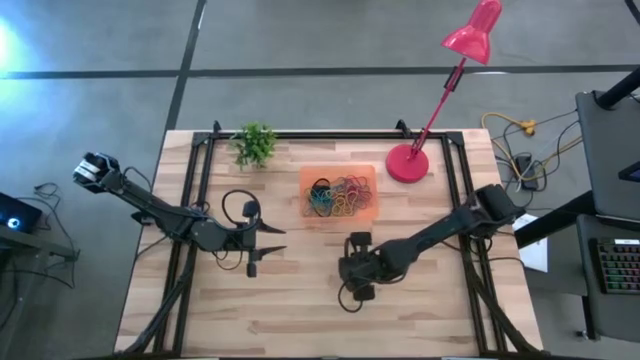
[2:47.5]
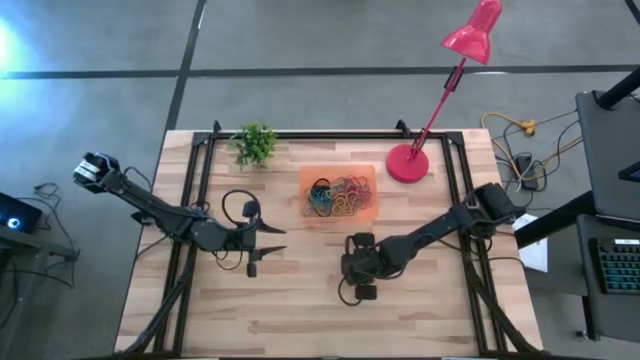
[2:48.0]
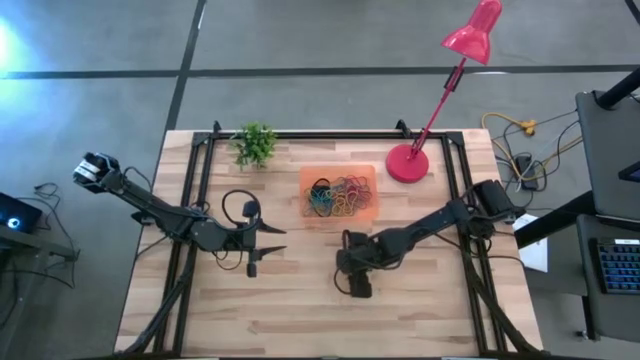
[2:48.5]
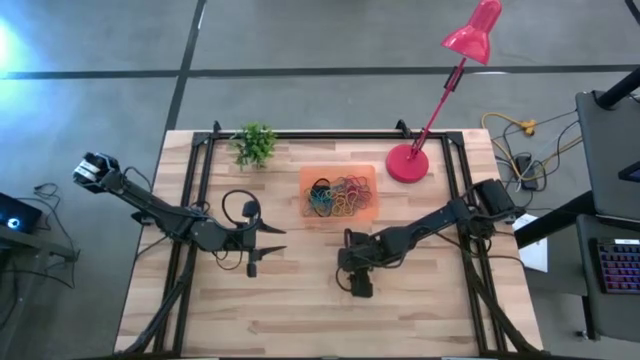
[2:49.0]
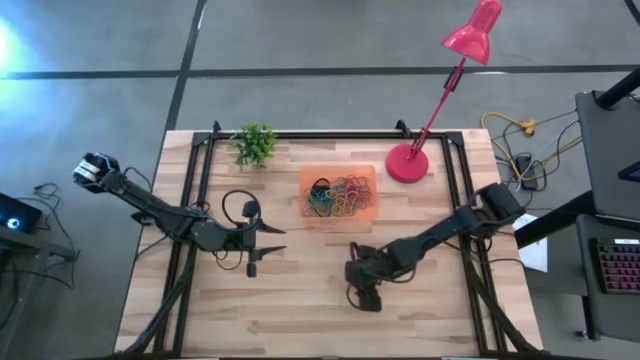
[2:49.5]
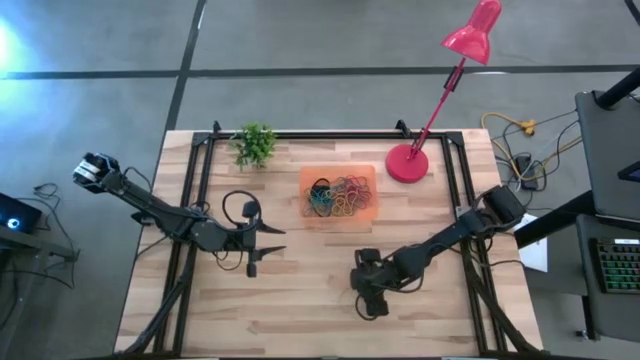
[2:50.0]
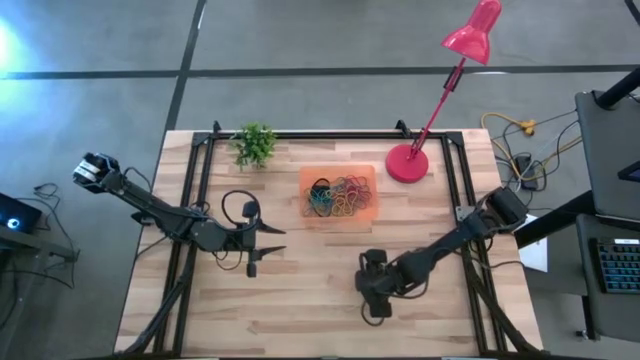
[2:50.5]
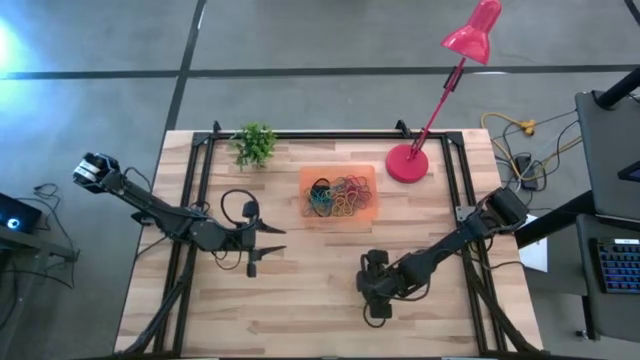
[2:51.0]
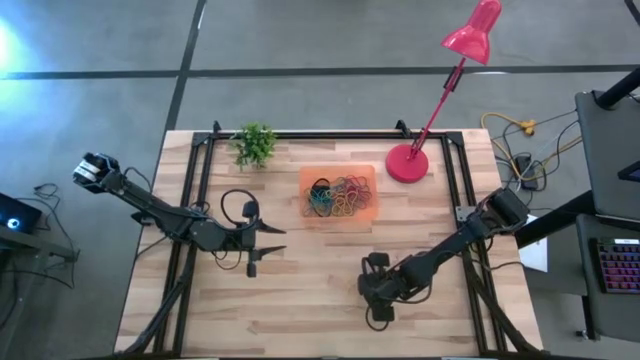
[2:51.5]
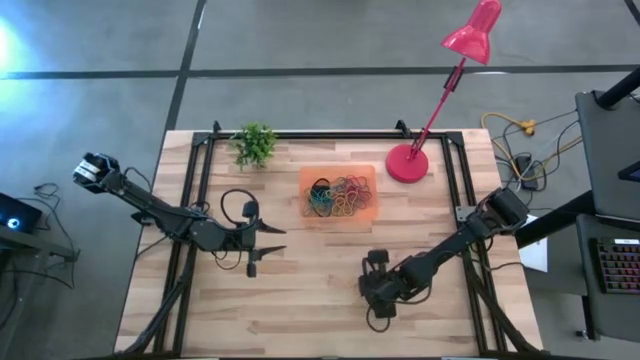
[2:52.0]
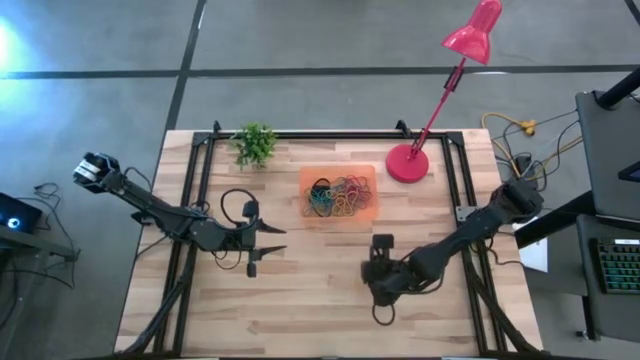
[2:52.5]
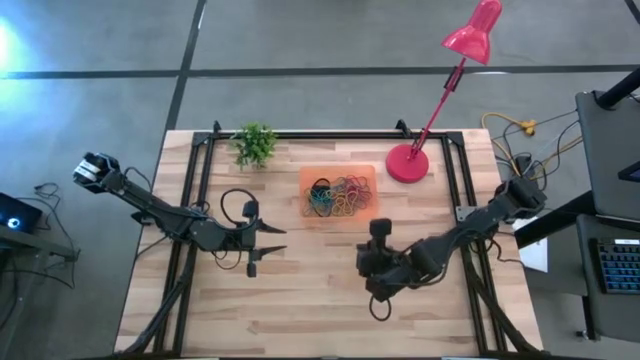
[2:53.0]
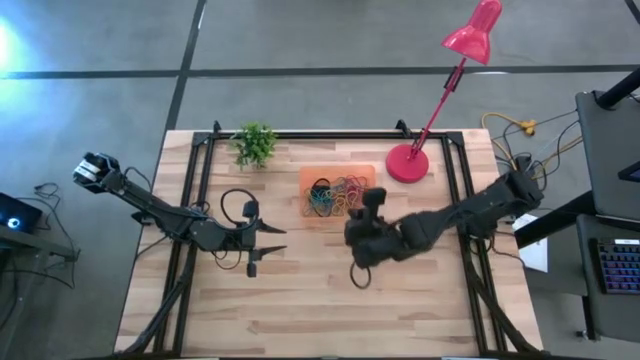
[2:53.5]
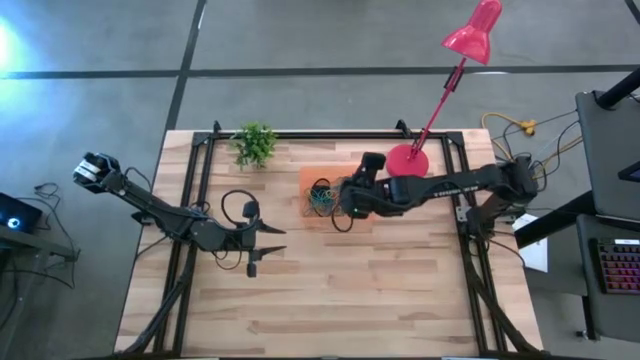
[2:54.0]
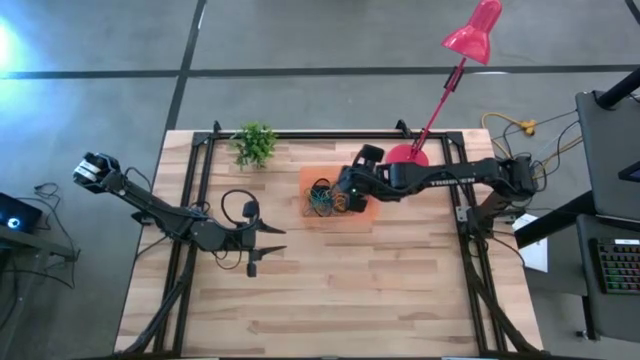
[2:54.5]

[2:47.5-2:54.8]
Task: Pick and place rubber bands into bin
Put the yellow rubber band into the bin

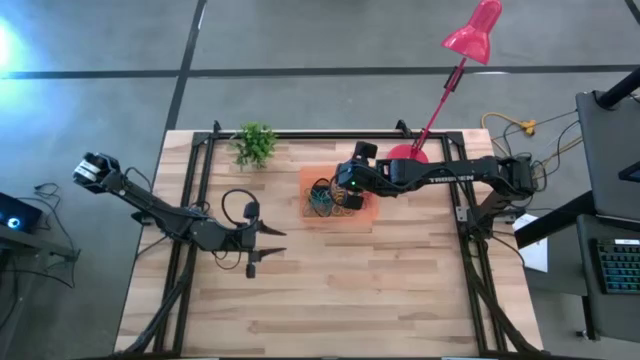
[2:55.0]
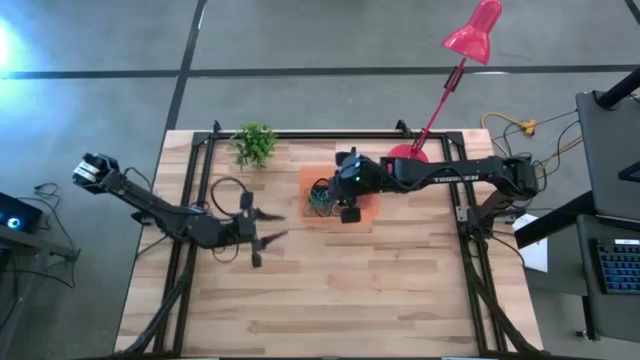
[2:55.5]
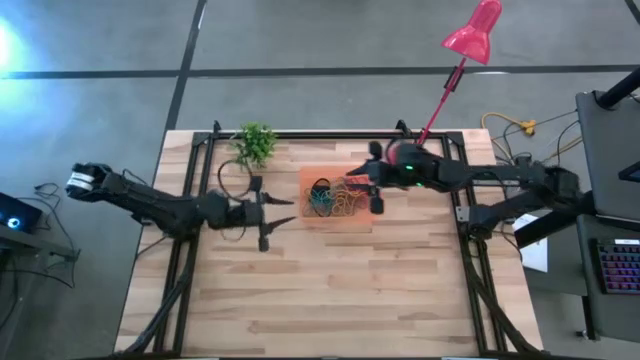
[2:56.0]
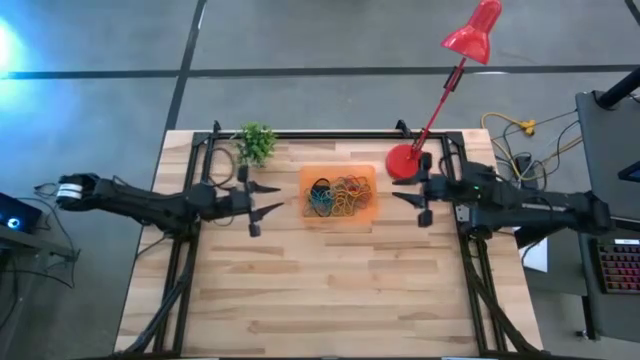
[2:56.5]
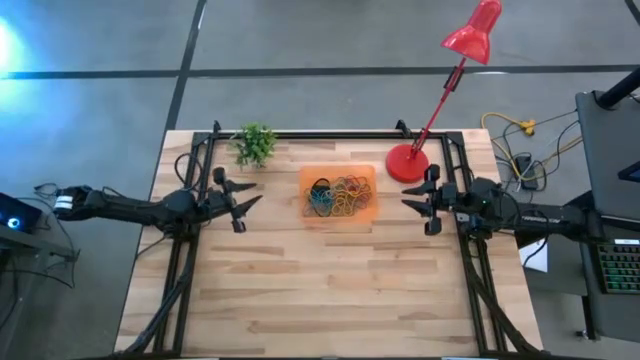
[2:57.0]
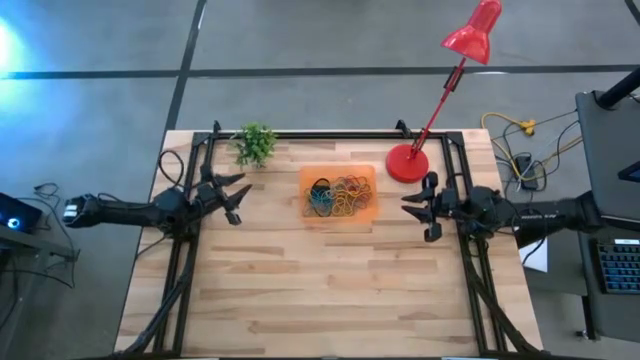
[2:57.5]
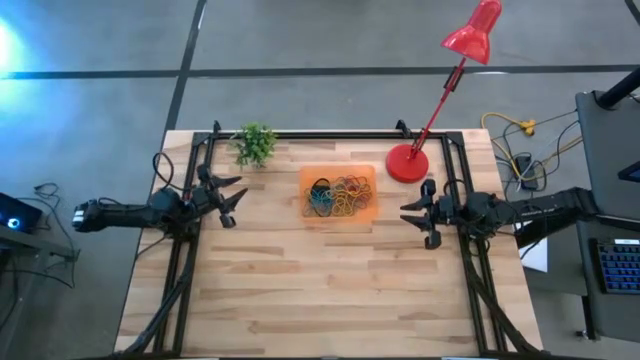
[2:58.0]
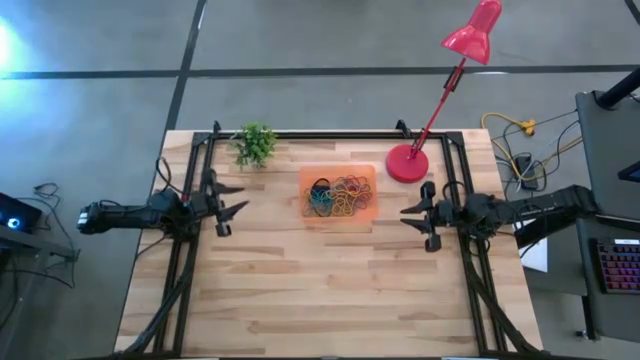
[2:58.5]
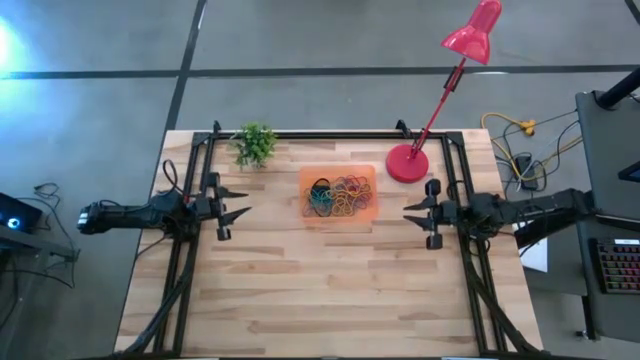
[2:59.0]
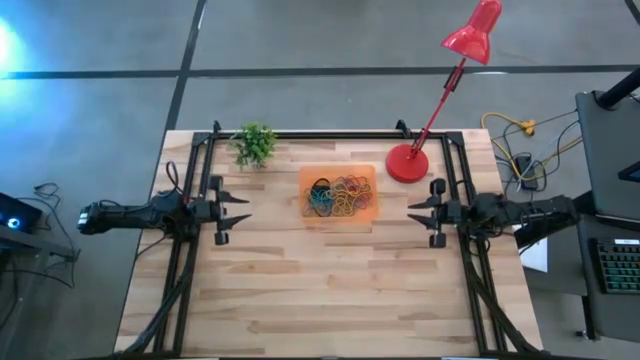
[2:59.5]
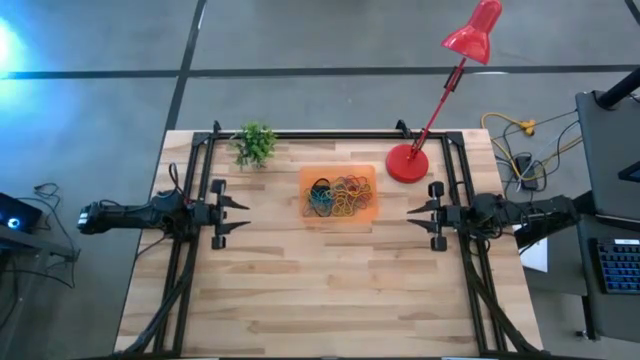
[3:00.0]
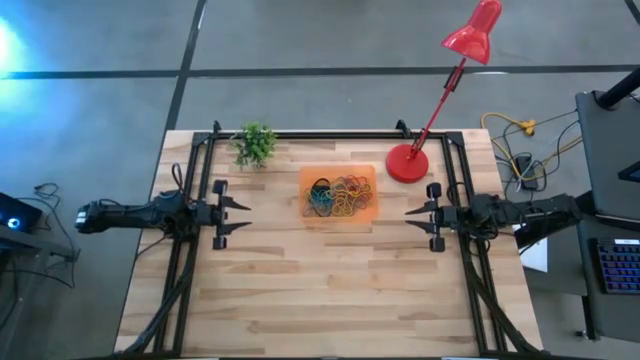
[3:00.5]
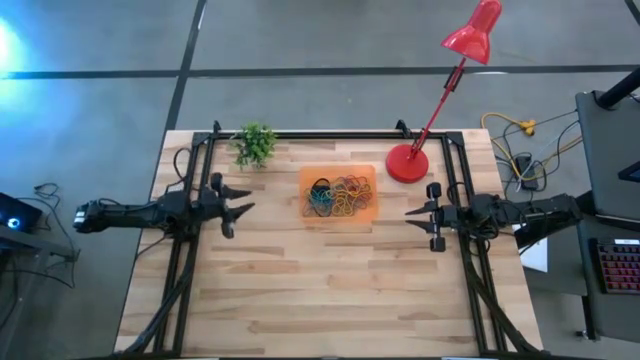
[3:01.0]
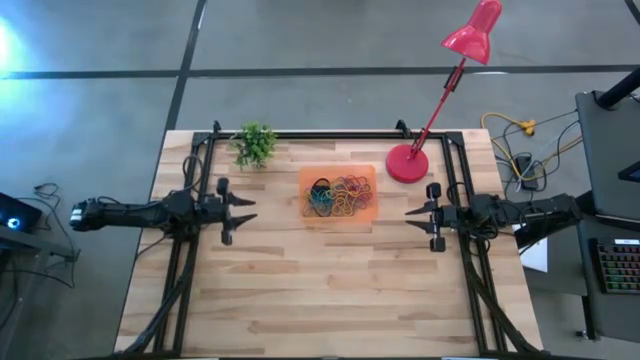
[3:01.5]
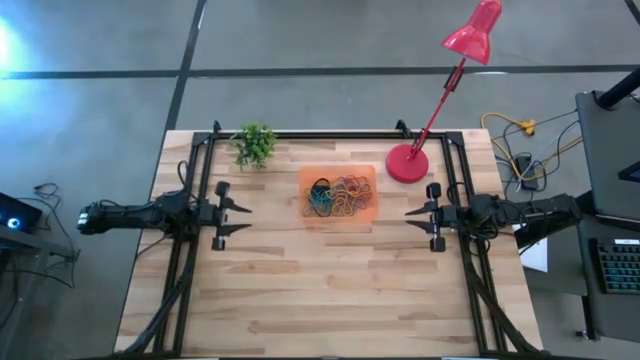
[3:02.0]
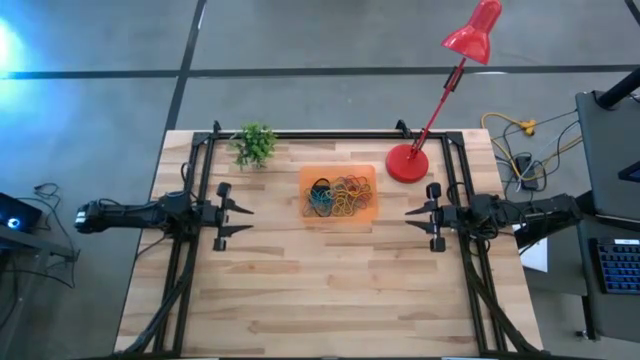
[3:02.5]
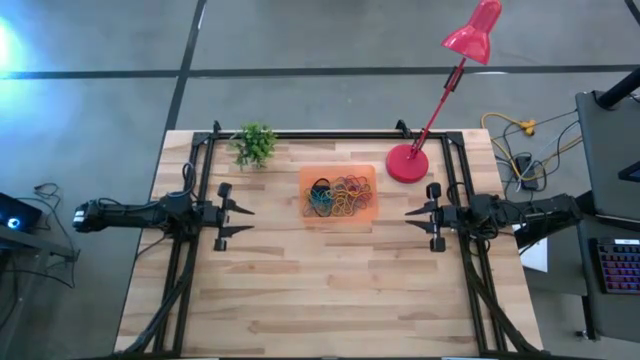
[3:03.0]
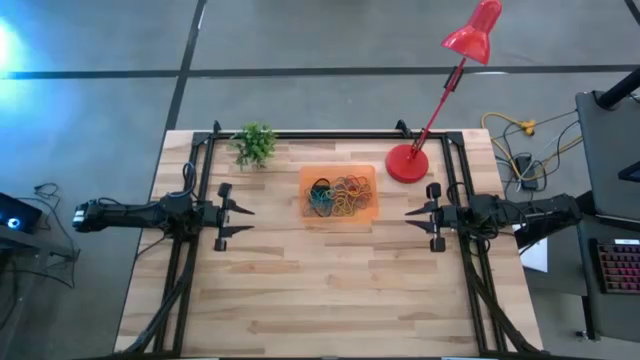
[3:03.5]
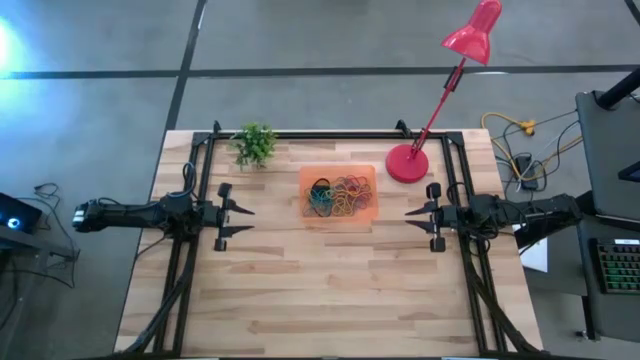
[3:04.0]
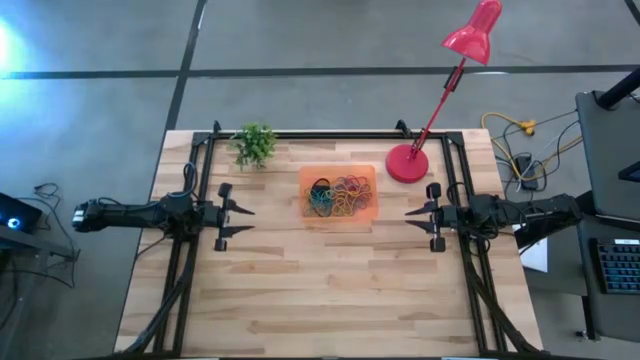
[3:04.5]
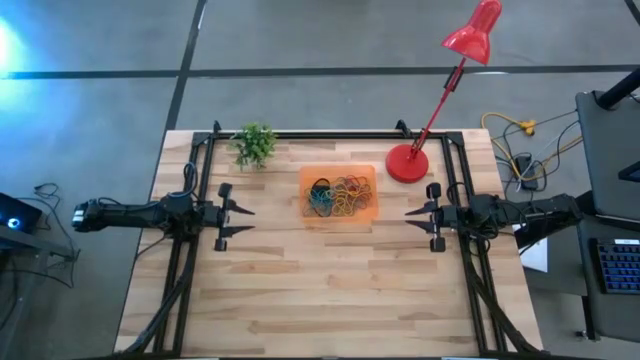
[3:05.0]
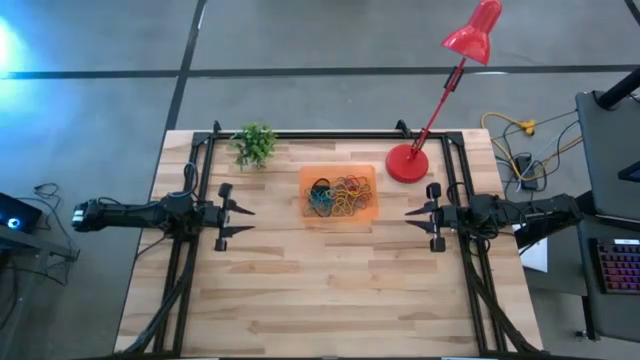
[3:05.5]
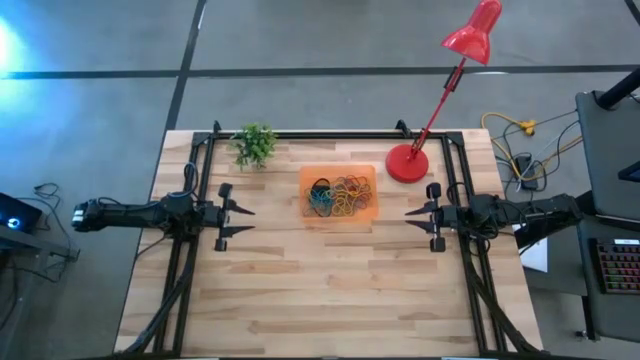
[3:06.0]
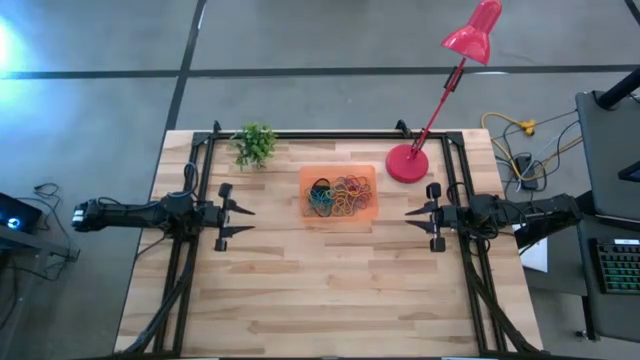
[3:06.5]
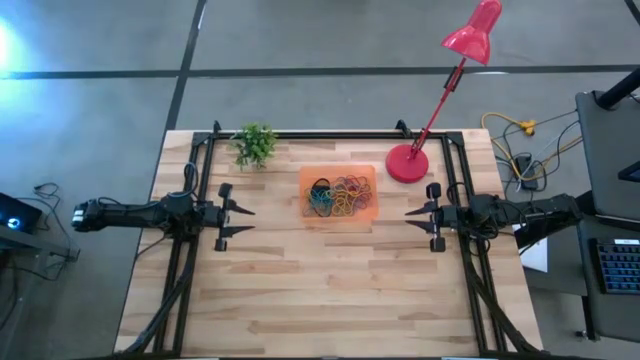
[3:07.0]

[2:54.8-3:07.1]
Return to Home Position

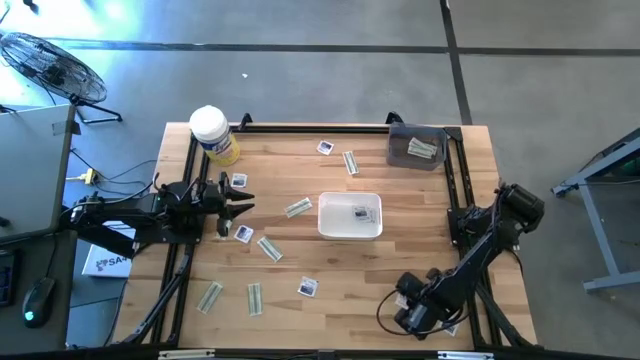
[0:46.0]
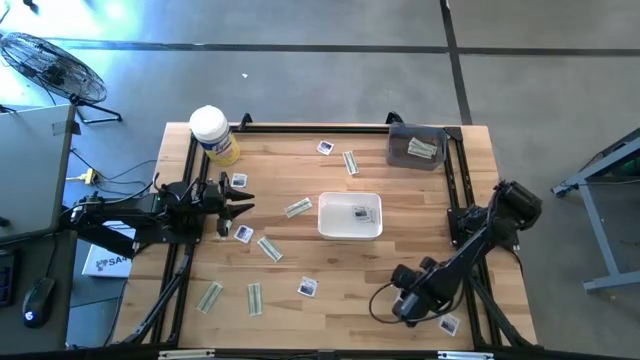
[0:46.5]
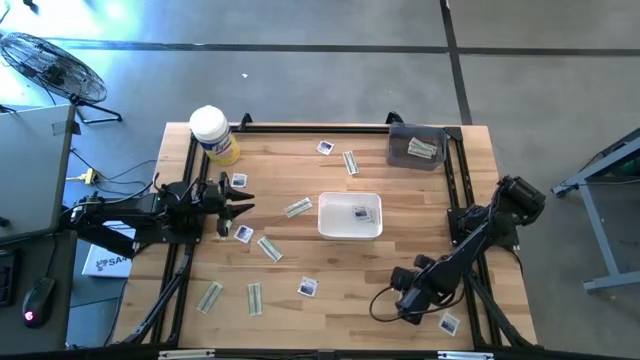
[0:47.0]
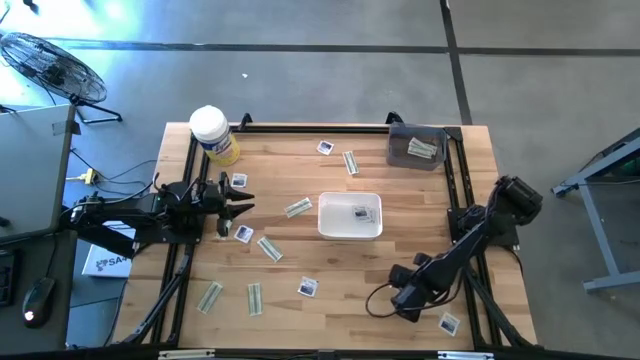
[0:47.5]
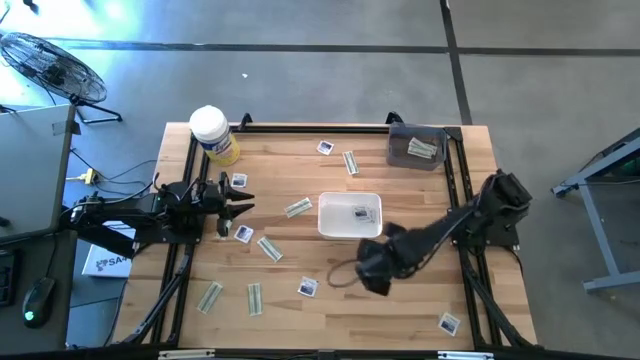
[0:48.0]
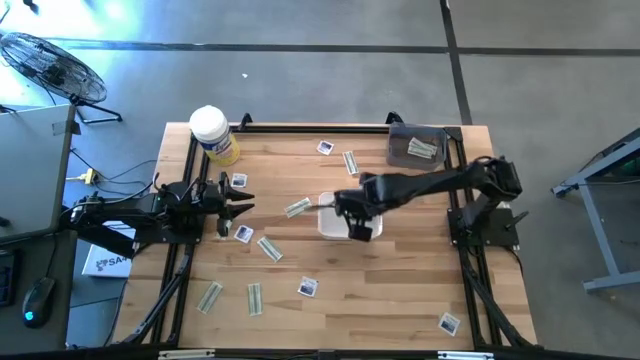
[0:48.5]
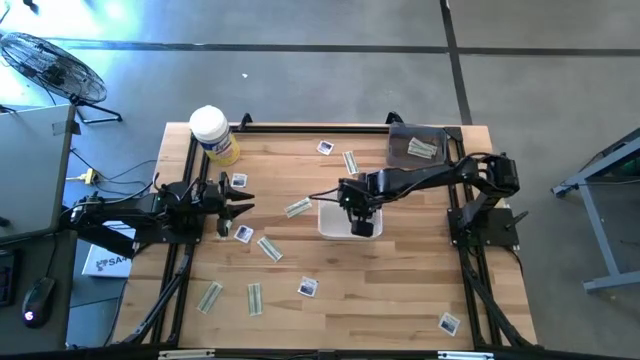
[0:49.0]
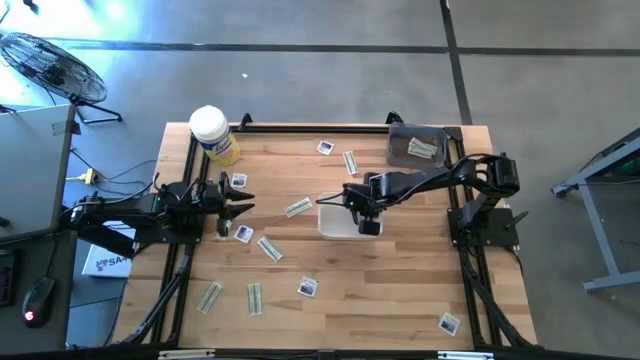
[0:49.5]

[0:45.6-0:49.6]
Task: Pick & Place First Aid Supplies
Put the blue alcohol pad into the white bin
